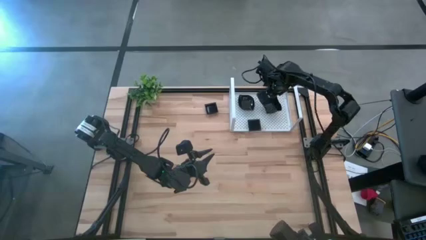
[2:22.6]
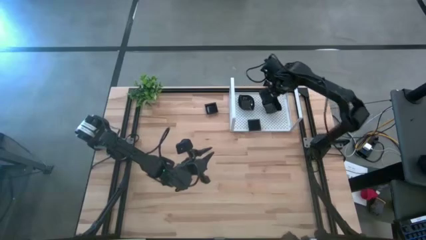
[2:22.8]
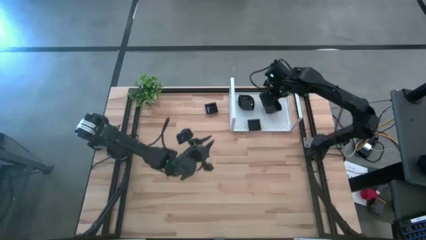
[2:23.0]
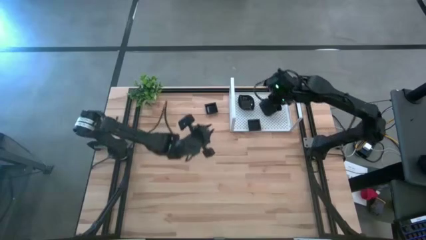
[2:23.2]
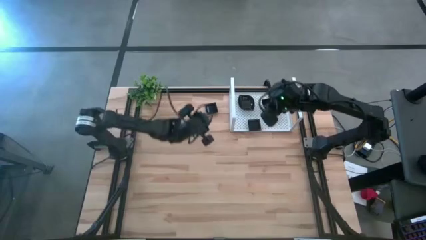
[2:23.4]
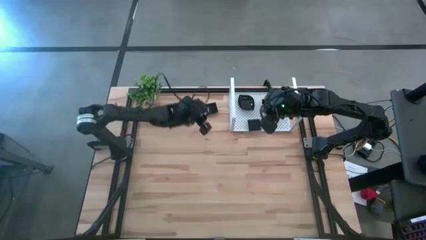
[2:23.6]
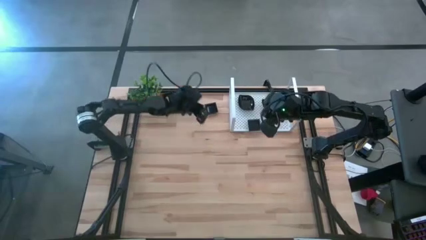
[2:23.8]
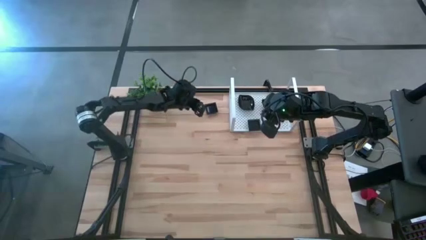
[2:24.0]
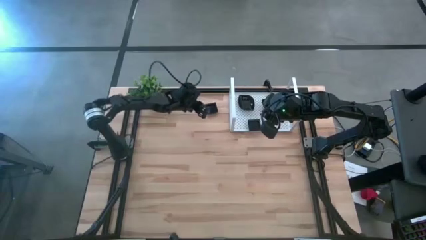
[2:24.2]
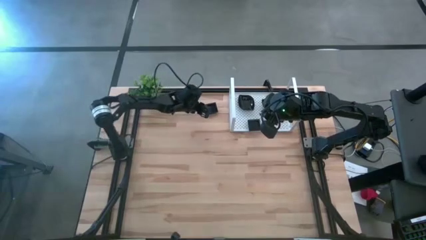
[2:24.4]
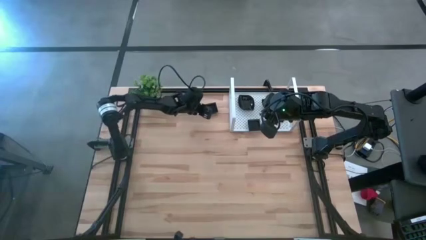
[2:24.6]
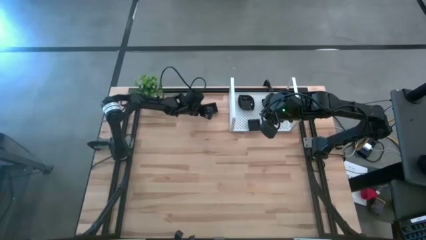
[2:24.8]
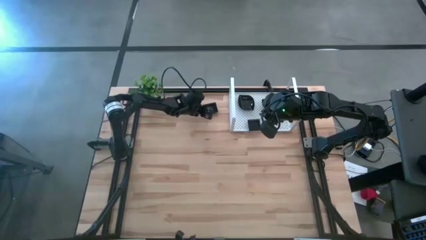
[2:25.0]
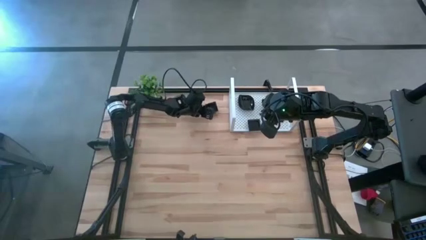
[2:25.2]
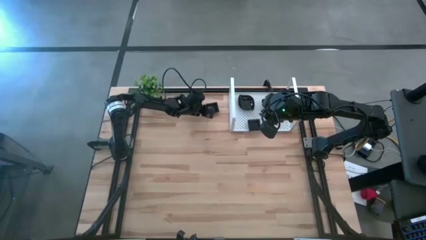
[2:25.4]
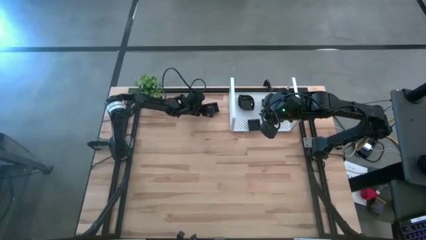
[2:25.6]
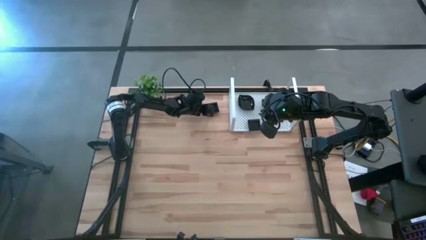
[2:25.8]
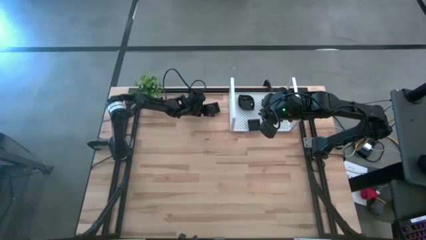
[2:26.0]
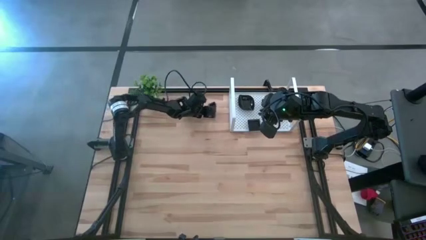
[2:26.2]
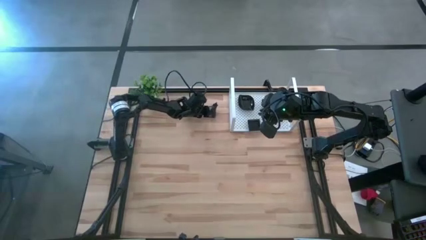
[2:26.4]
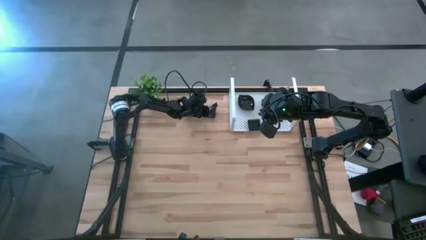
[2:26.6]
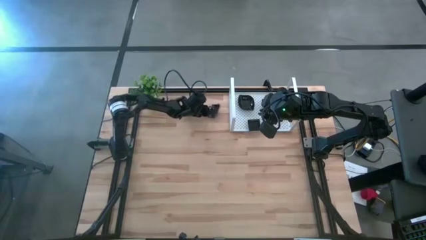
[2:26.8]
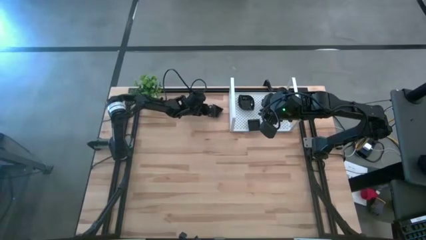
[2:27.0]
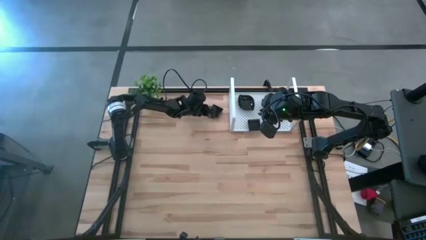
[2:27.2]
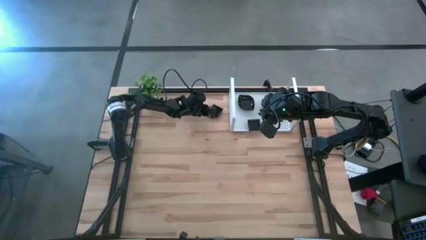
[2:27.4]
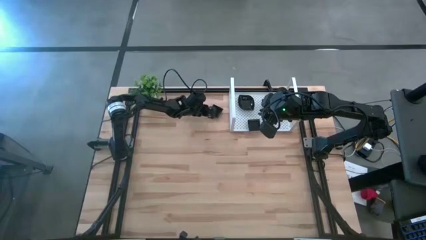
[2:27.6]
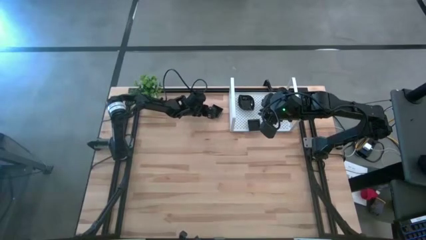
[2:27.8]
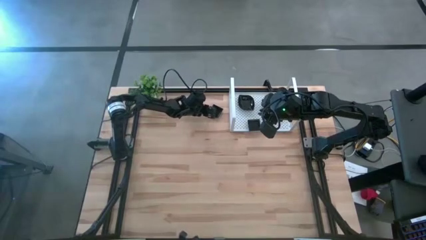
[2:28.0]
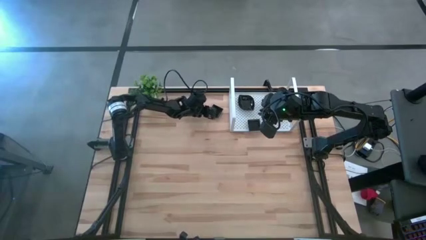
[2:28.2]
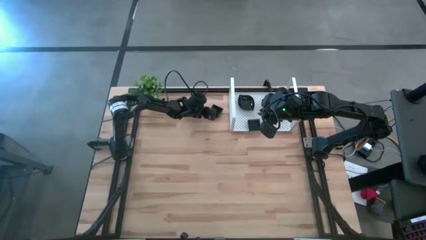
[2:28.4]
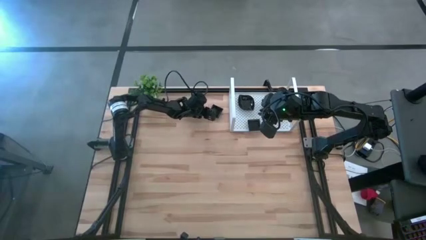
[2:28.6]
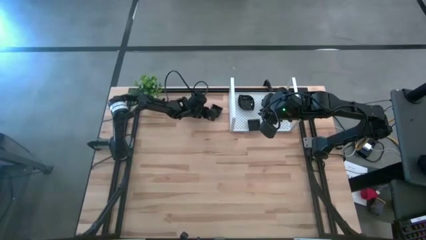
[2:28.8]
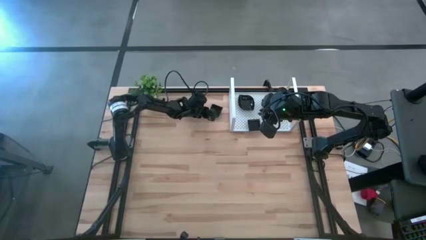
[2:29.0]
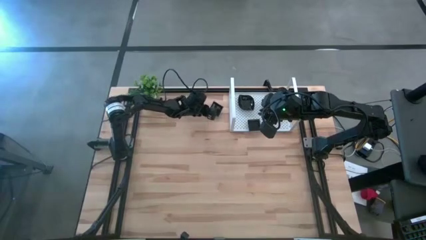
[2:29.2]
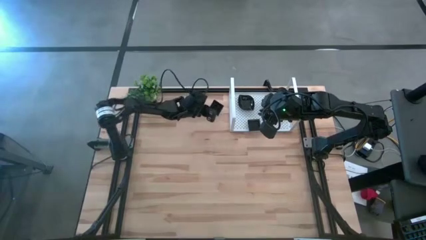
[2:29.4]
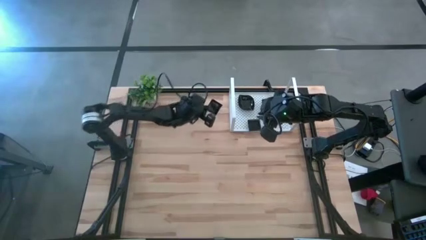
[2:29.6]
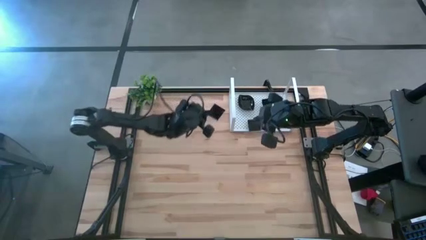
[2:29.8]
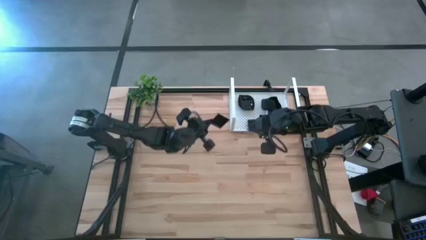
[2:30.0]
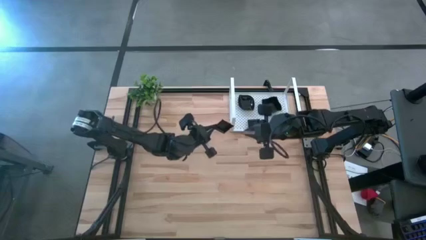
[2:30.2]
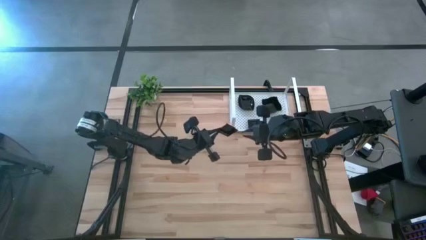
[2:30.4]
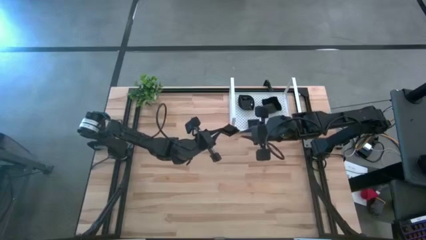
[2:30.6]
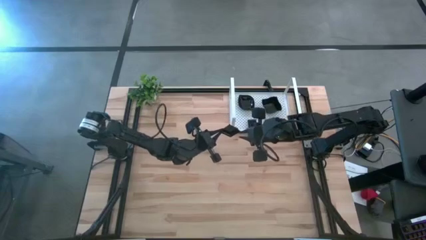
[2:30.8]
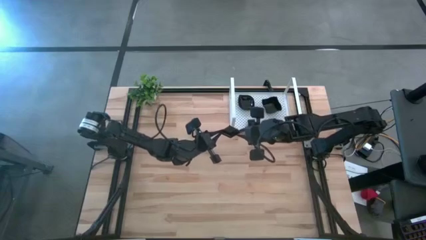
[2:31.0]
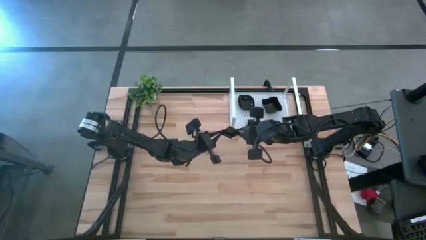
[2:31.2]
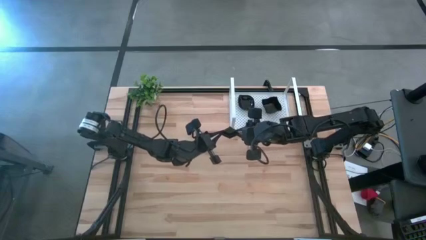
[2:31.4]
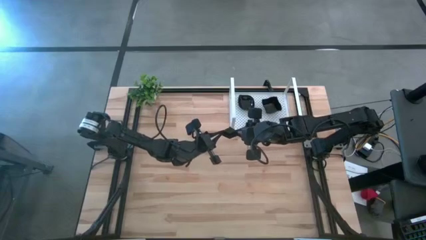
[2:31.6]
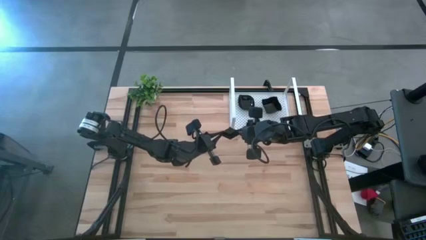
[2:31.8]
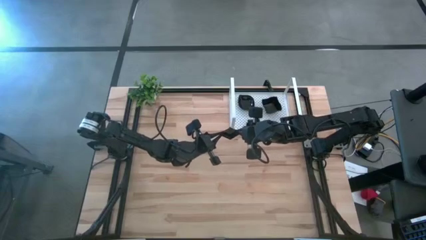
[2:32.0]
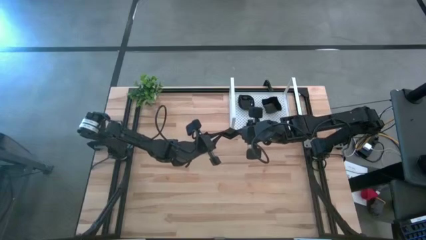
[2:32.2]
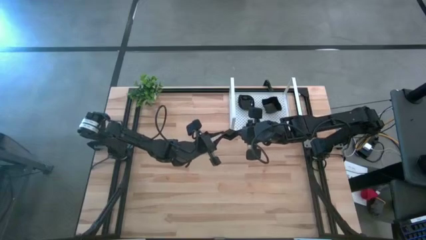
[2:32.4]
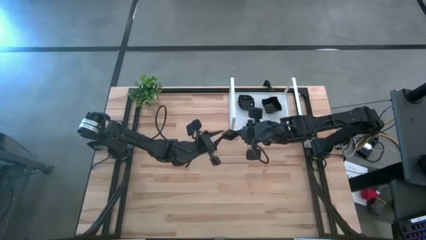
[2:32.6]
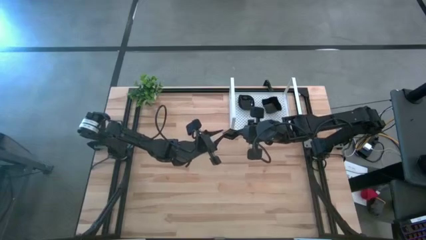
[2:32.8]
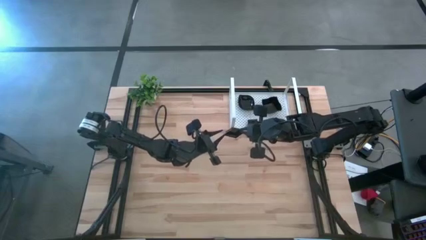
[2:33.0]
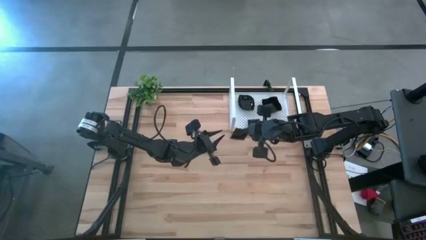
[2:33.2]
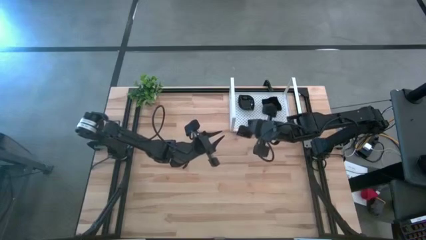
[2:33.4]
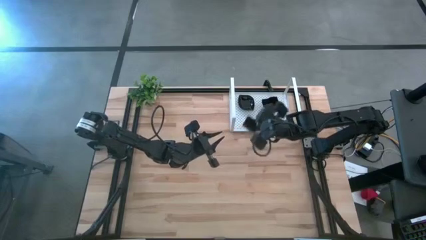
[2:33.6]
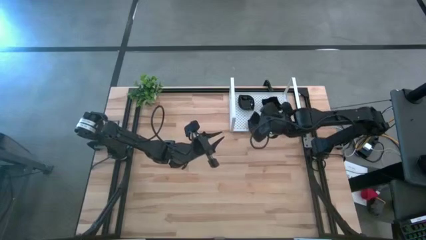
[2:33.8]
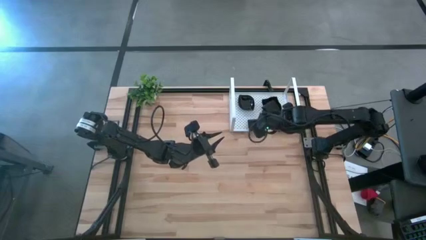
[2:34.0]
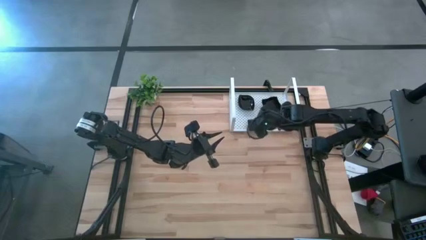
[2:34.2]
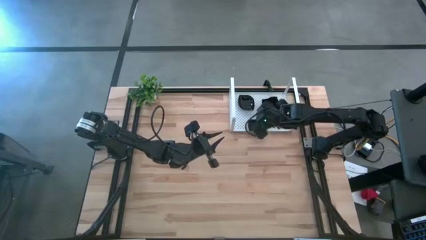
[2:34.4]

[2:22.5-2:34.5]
Task: Pick & Place Mini shaped plates
Stack the square plate on top of the other square plates on the shelf

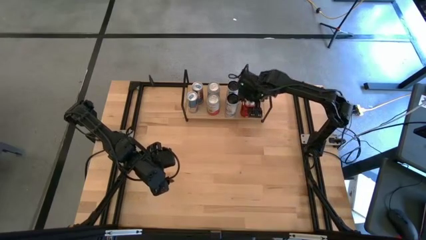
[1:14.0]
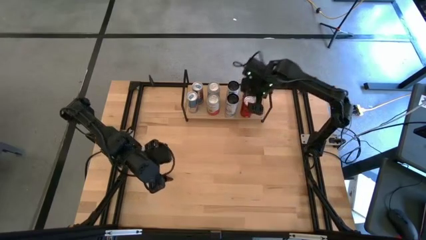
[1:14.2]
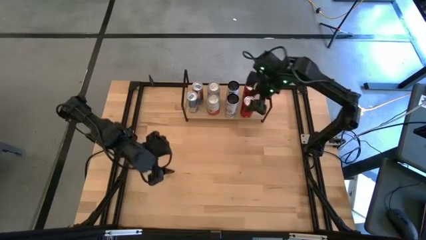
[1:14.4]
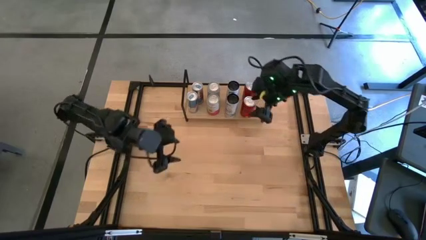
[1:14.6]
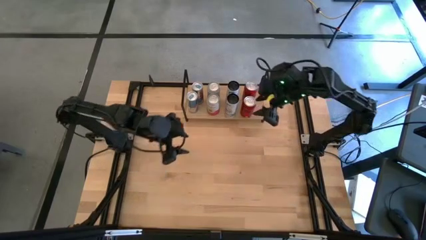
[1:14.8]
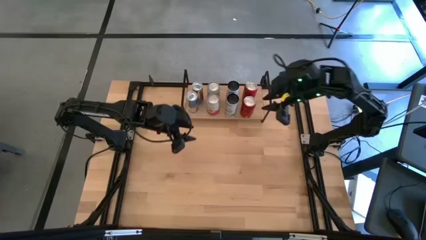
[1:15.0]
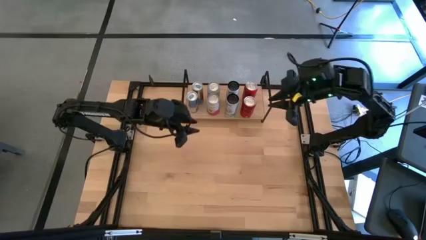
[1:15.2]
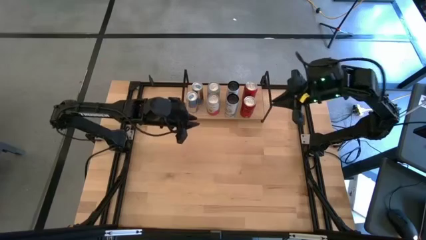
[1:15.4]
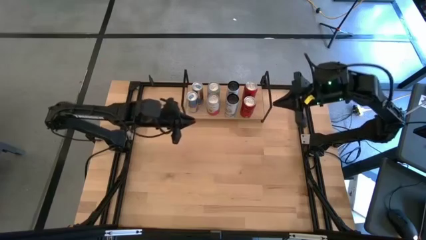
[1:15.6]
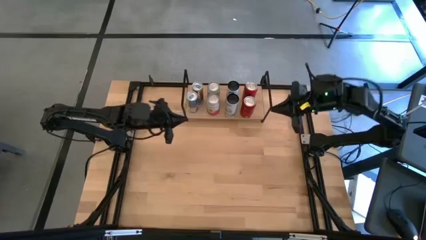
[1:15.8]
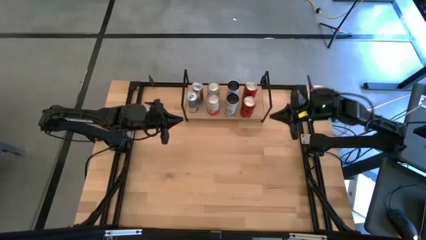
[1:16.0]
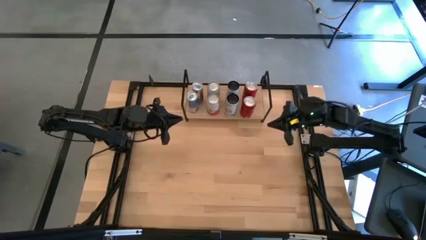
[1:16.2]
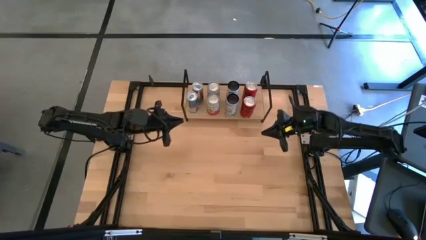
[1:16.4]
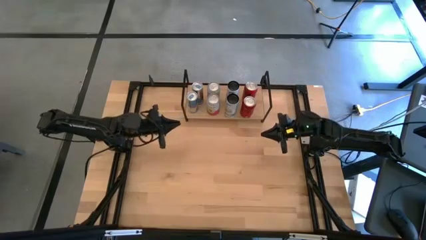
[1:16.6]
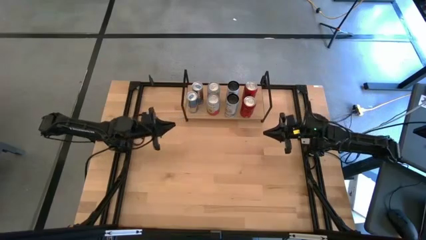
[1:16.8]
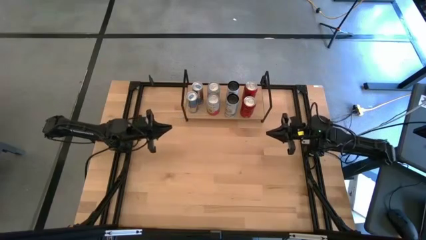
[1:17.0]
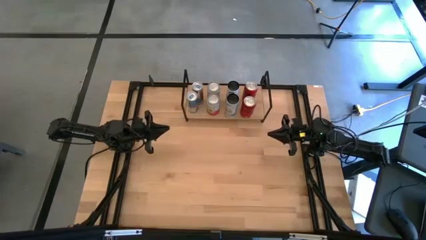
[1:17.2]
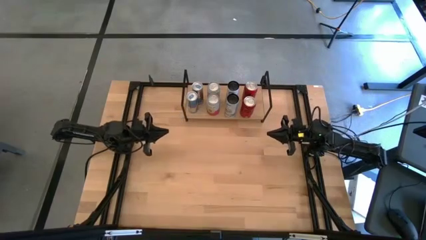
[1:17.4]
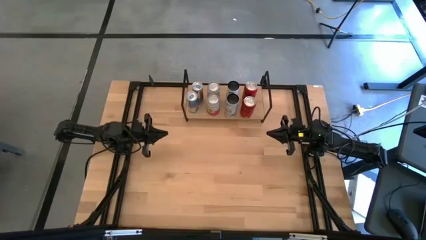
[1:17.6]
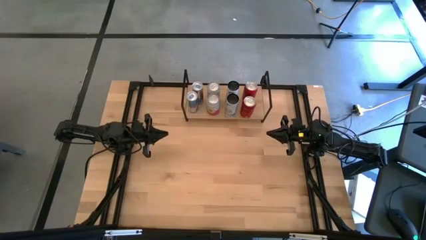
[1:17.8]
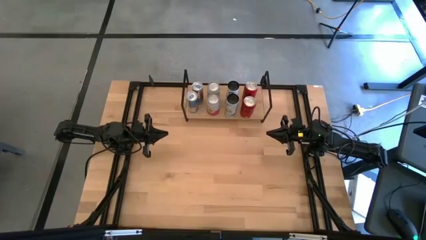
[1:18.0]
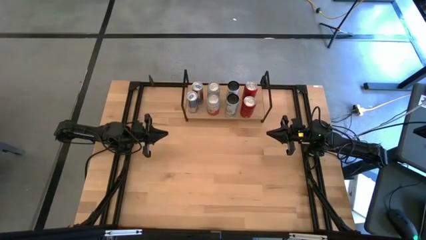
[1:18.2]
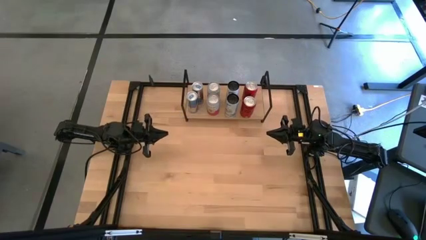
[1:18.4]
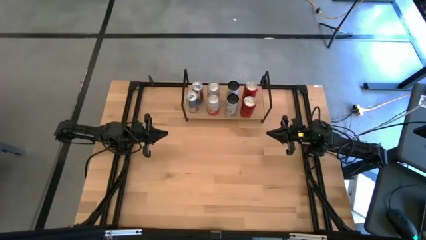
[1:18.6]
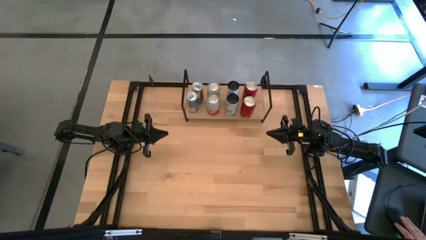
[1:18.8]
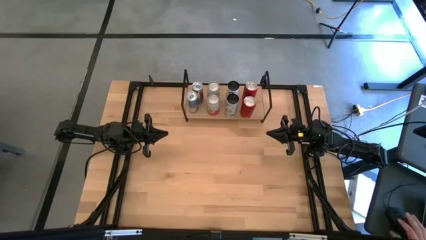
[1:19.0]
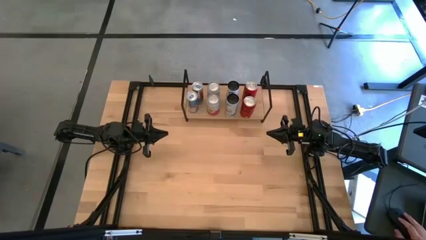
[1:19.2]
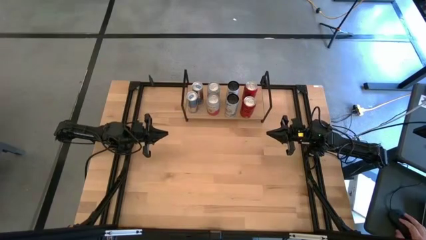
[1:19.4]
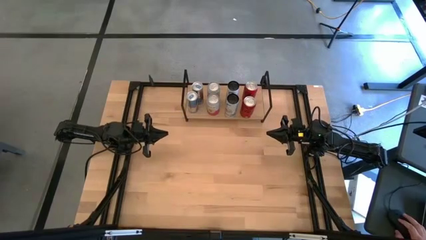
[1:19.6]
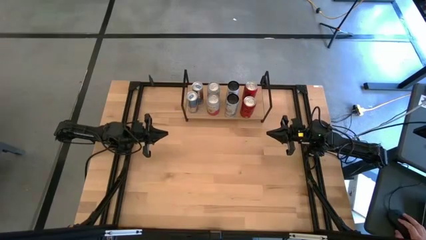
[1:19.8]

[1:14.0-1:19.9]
Task: Place canned beverage on shelf
Return to Home Position
